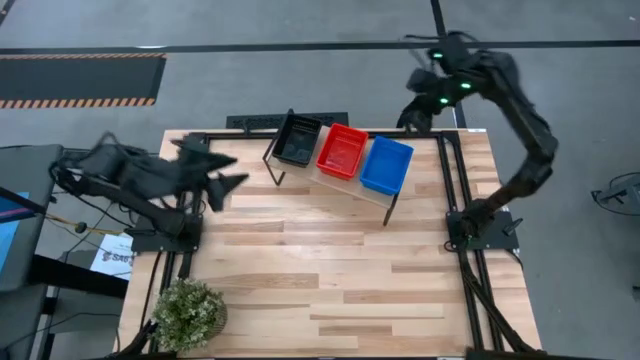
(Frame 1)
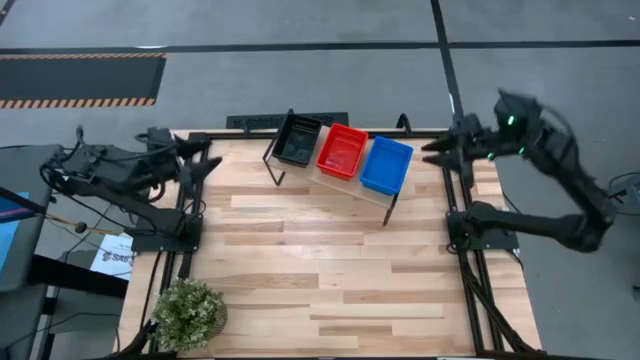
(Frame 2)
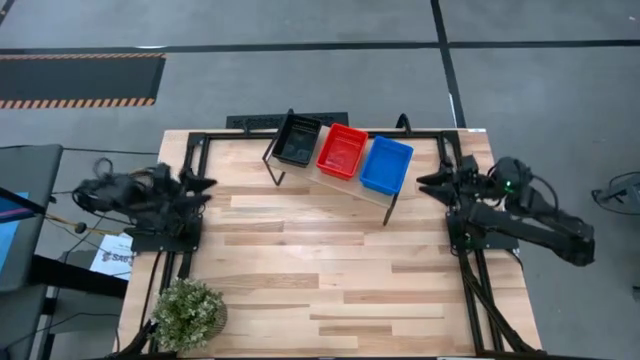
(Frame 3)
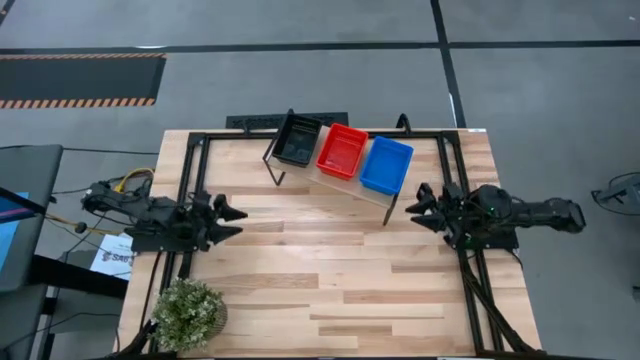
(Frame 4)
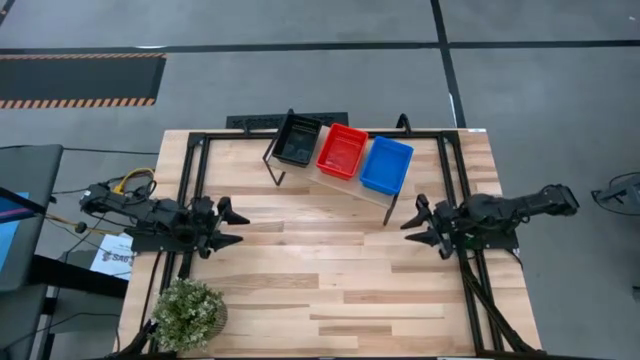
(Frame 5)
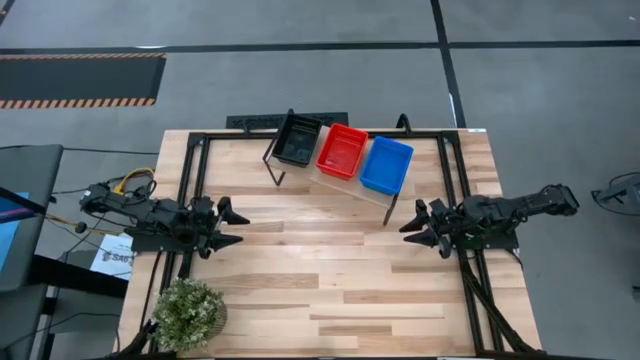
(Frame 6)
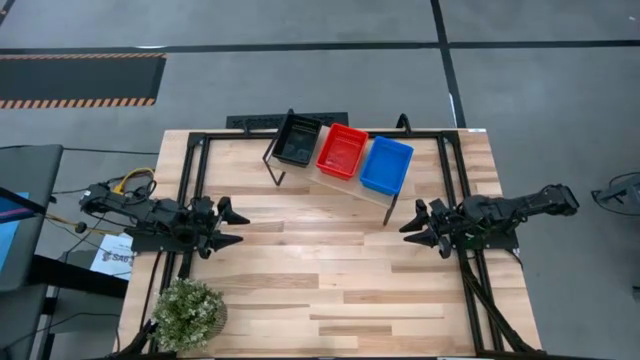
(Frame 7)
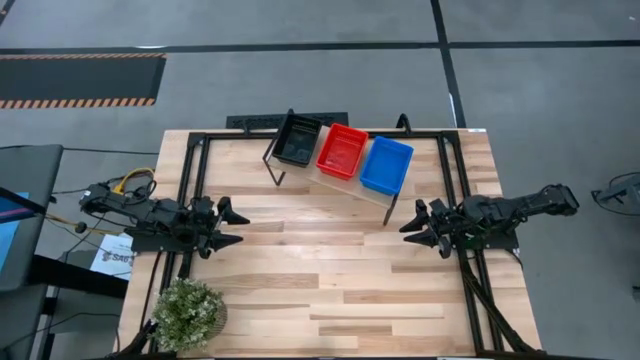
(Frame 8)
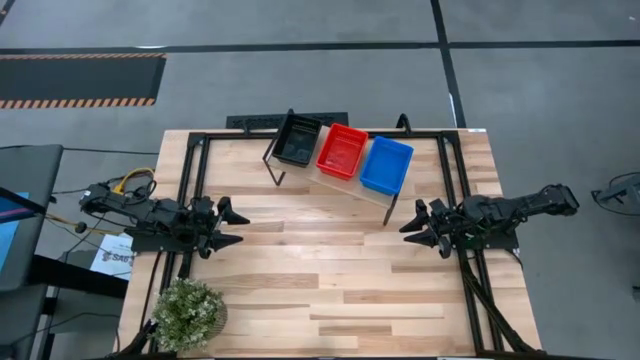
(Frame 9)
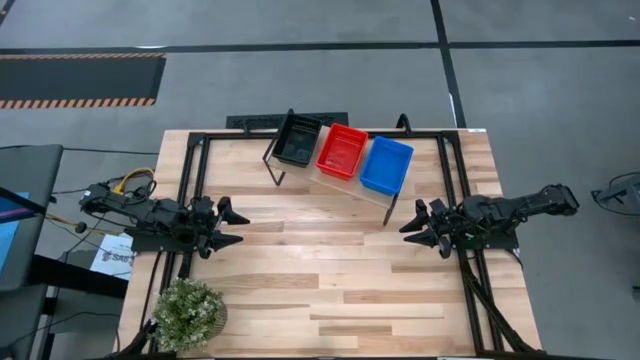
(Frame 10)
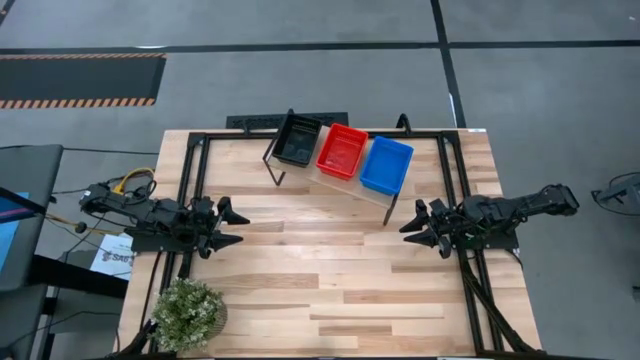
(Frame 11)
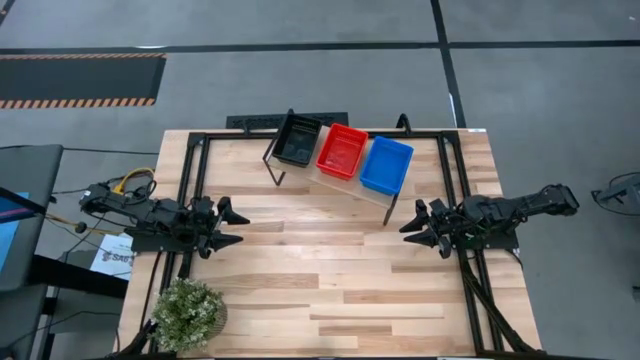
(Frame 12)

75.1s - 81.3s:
Task: Stack baskets on shelf by color
Return to Home Position

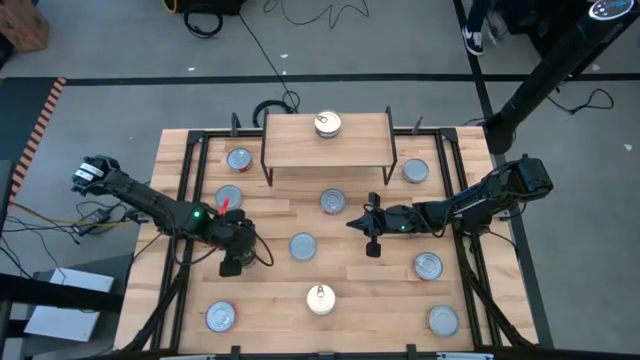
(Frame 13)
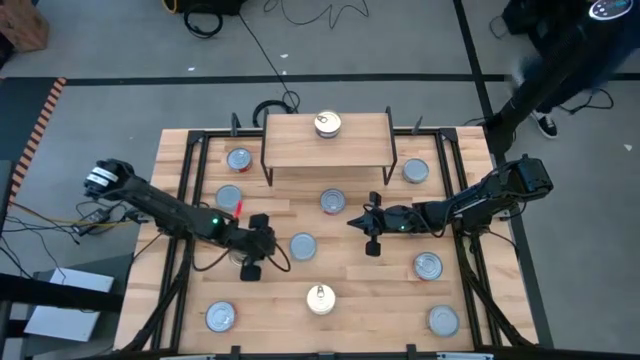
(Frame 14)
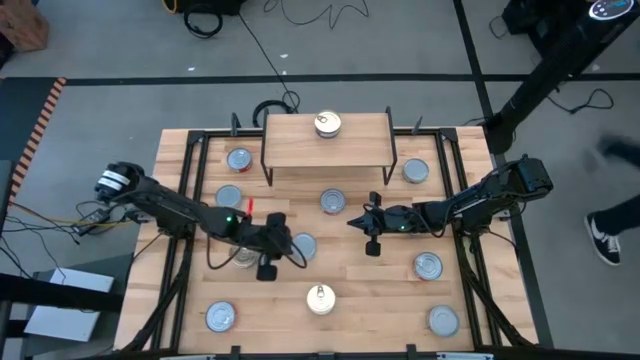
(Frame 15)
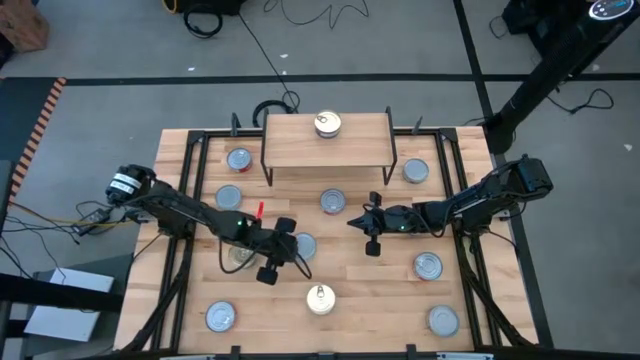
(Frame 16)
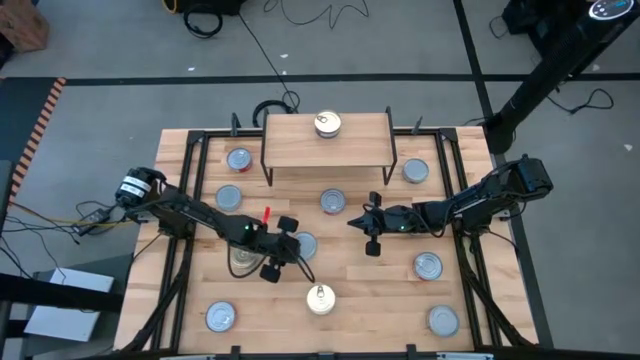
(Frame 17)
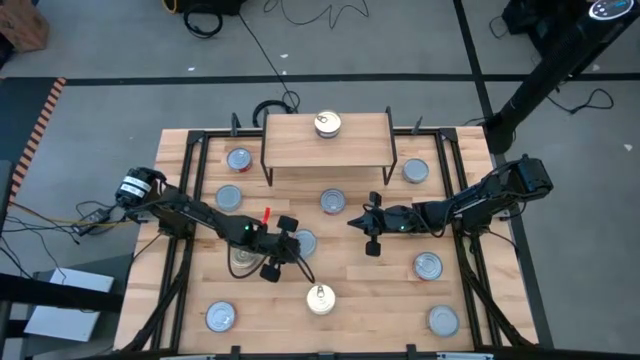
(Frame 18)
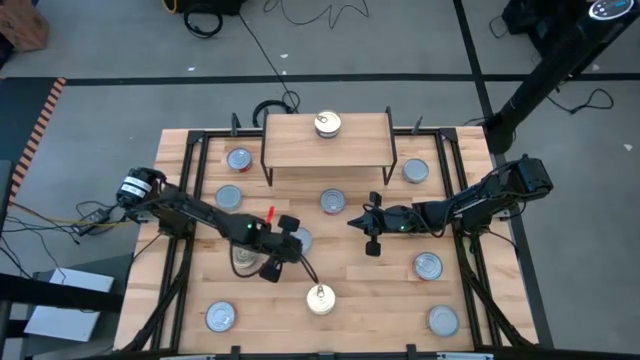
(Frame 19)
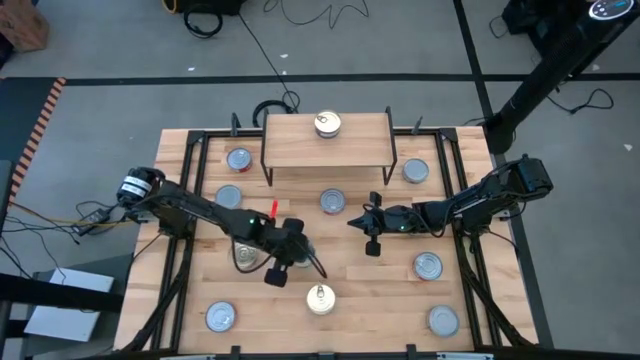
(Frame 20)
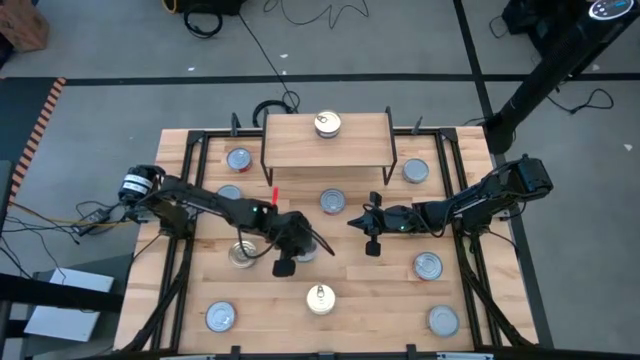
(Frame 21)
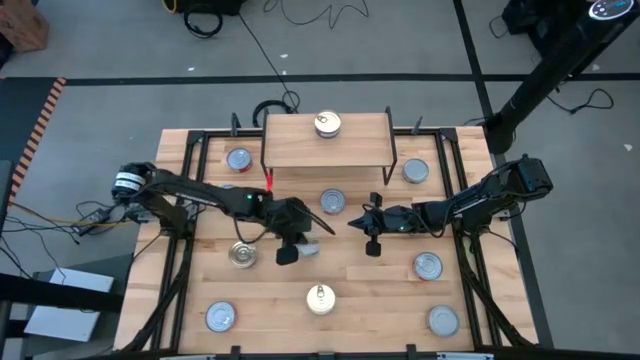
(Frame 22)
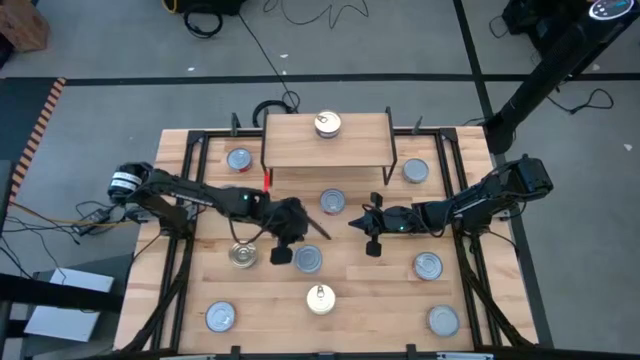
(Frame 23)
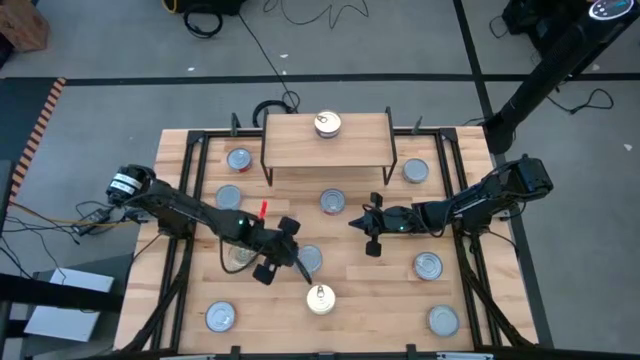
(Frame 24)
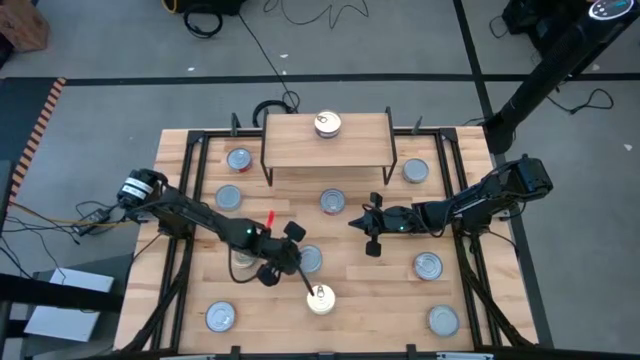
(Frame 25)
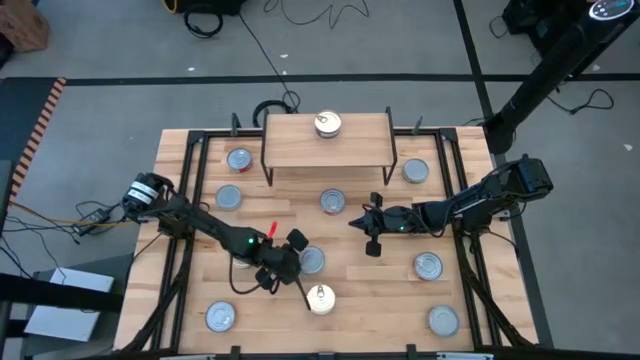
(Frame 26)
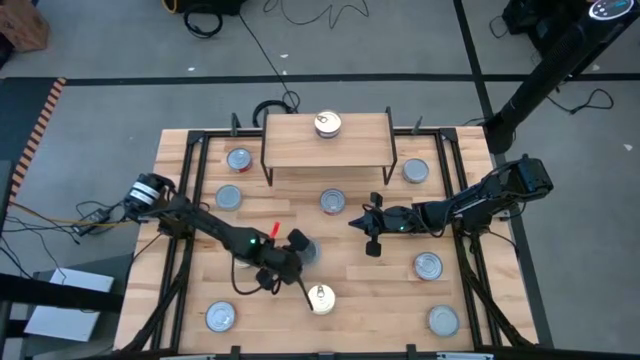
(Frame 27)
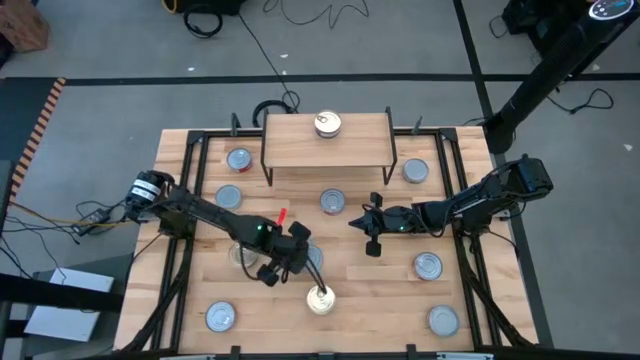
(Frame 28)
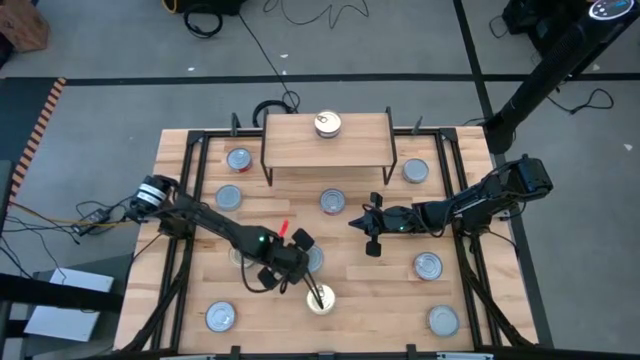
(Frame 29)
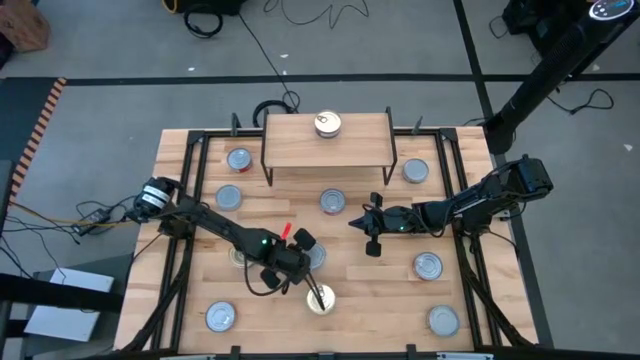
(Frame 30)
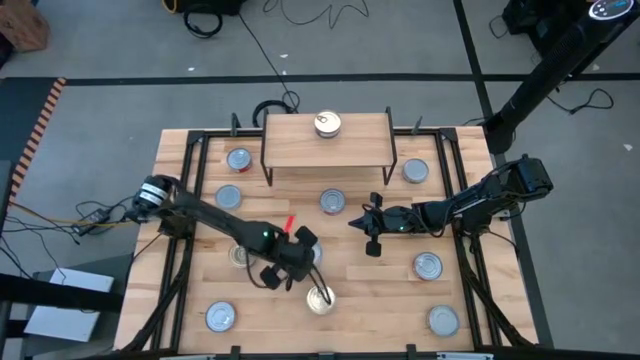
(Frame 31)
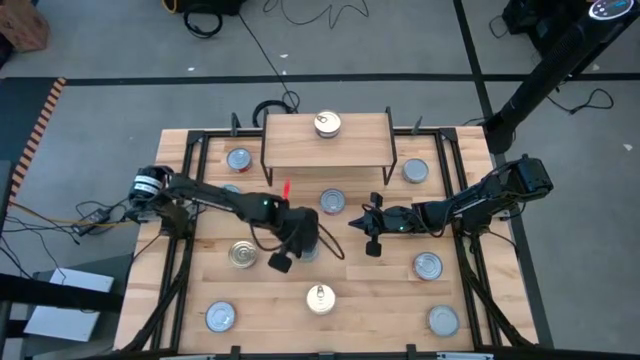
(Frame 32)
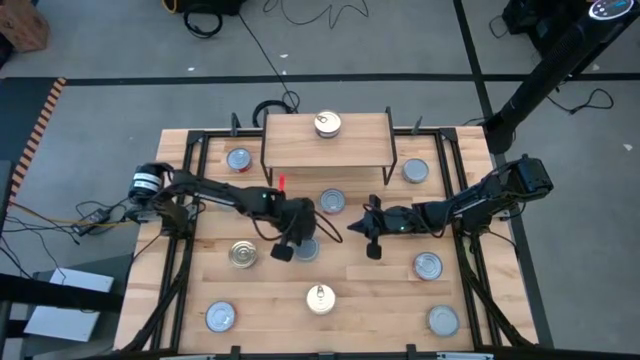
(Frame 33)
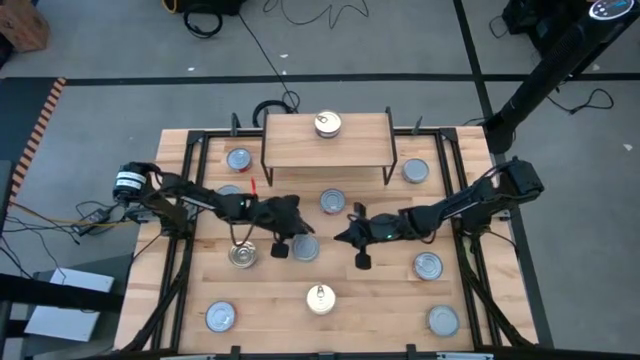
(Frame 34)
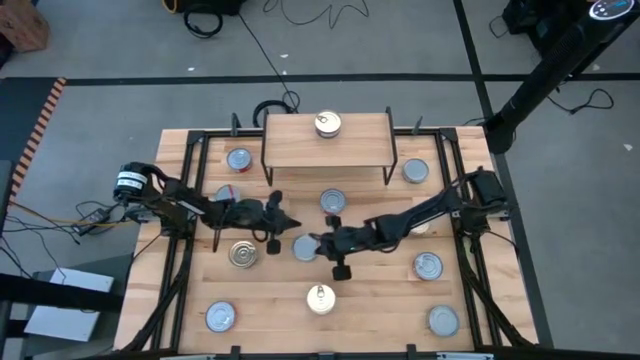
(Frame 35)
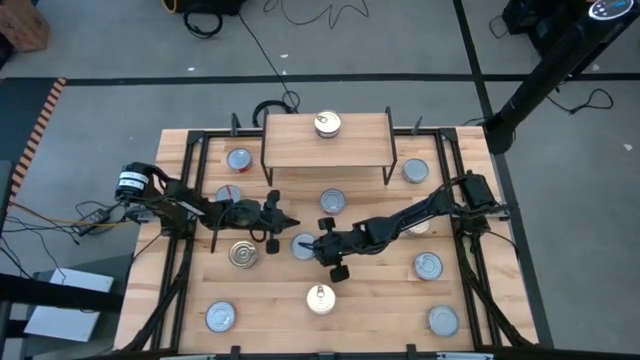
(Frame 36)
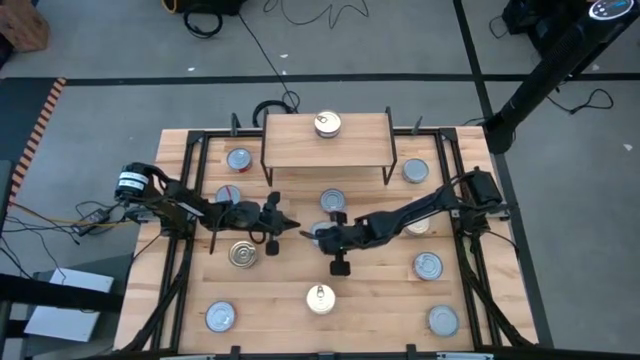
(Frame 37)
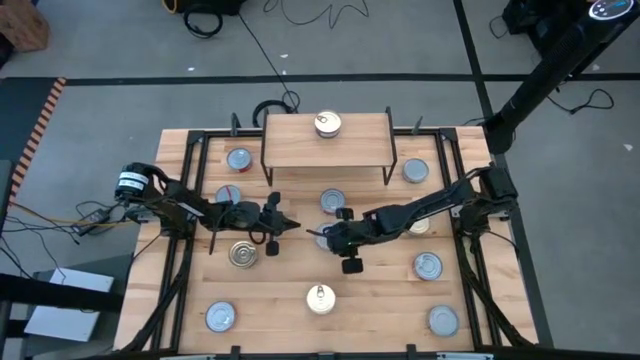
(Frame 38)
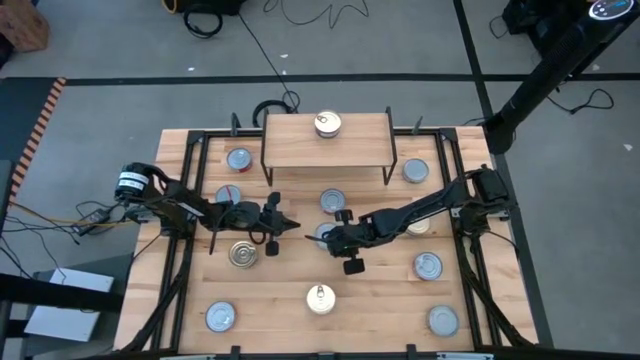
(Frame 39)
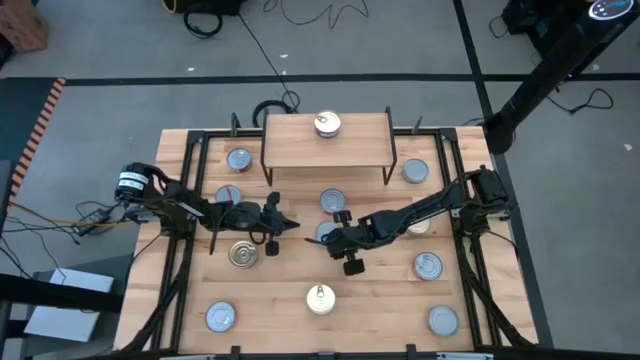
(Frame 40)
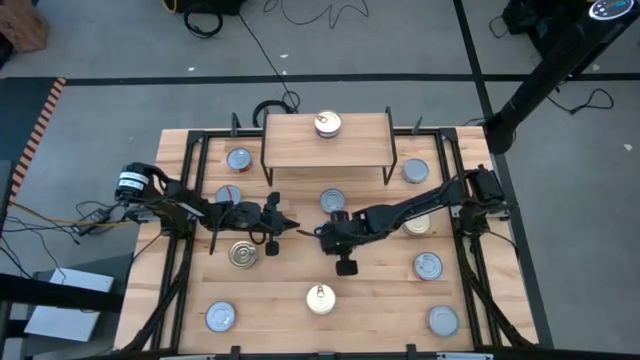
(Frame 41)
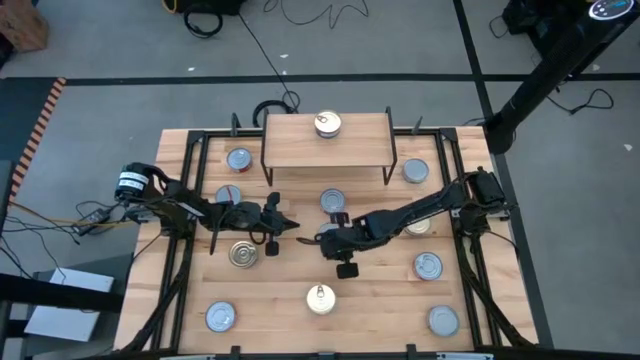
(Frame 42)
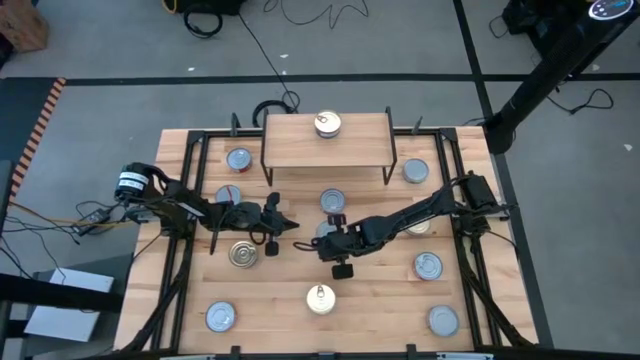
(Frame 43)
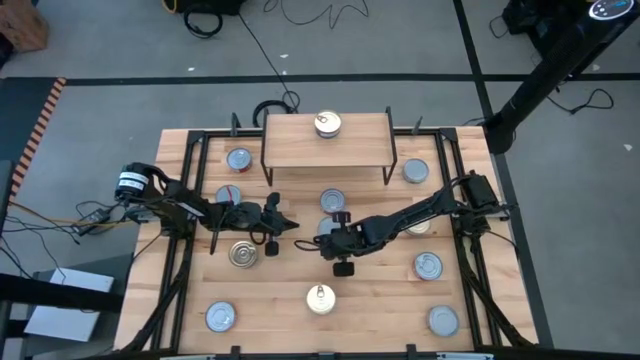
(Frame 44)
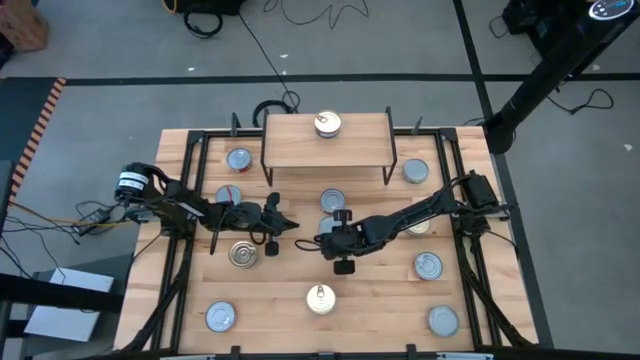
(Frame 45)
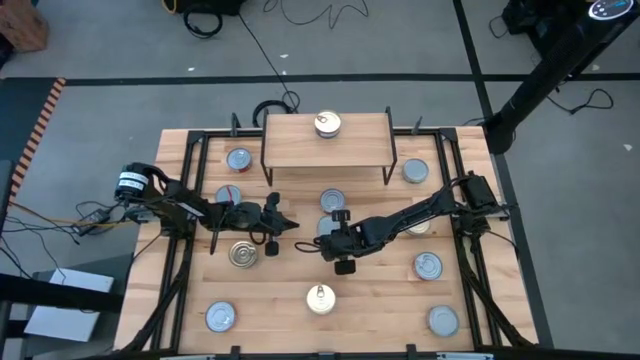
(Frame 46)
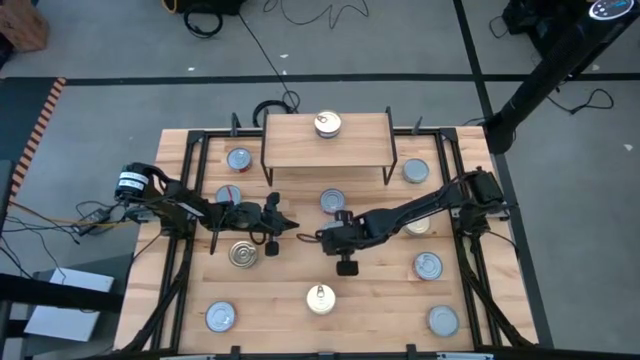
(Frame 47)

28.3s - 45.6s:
Task: Stack canned seafood by type on shelf
Put the green tuna can on the shelf
